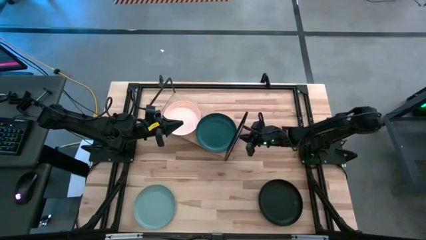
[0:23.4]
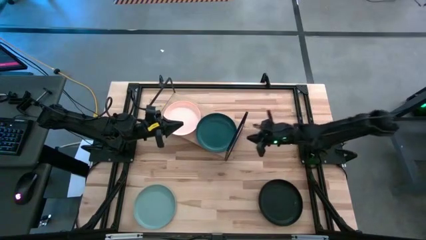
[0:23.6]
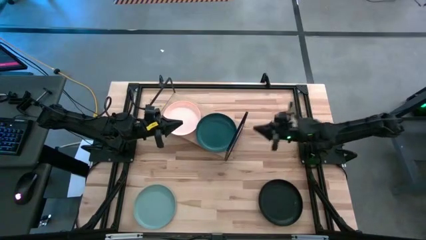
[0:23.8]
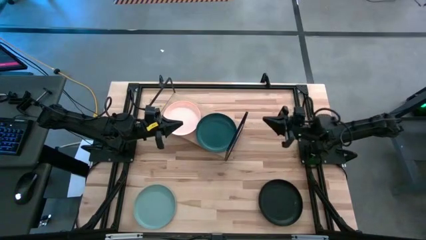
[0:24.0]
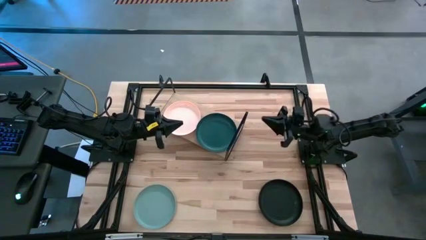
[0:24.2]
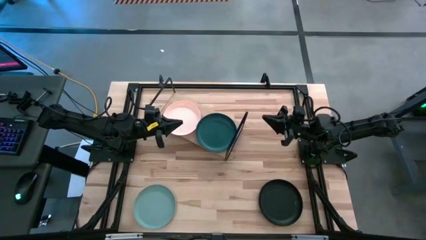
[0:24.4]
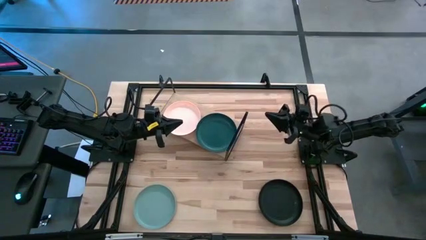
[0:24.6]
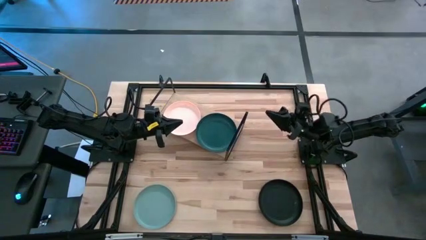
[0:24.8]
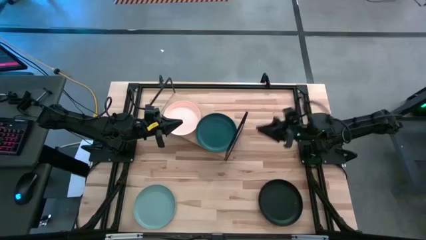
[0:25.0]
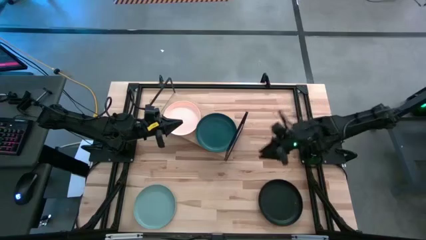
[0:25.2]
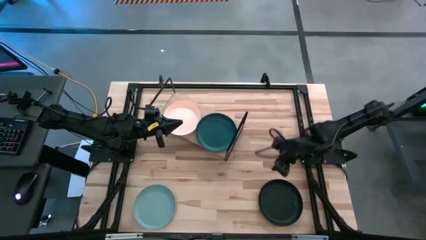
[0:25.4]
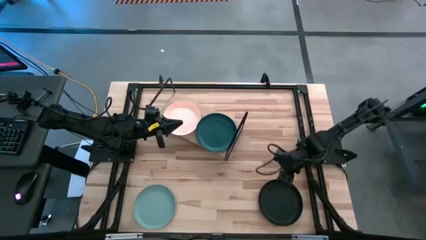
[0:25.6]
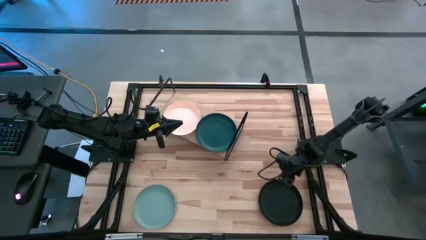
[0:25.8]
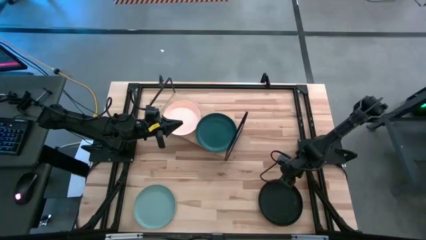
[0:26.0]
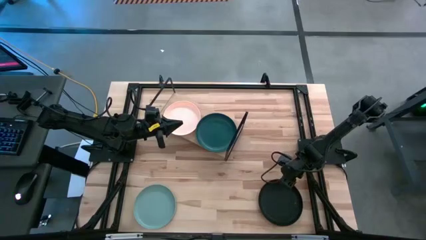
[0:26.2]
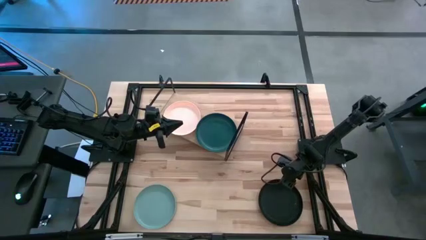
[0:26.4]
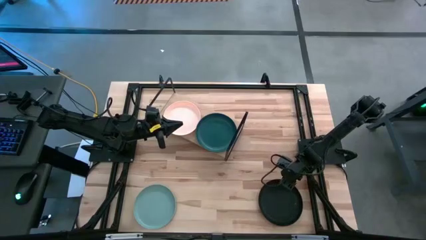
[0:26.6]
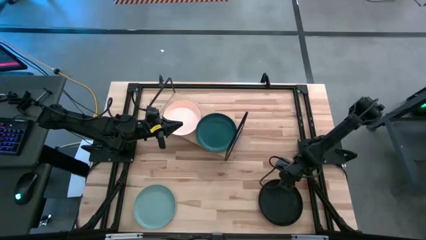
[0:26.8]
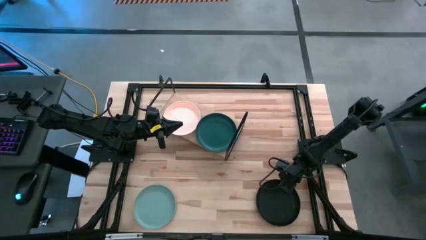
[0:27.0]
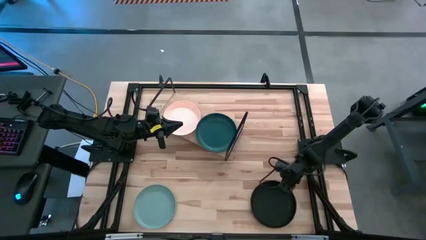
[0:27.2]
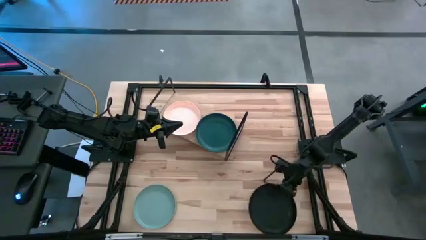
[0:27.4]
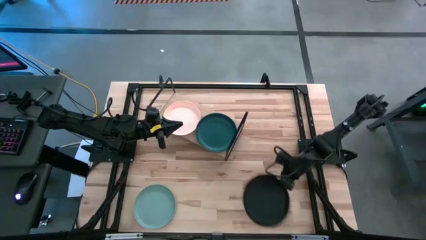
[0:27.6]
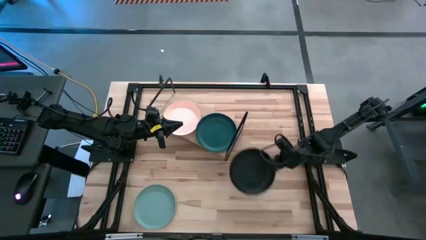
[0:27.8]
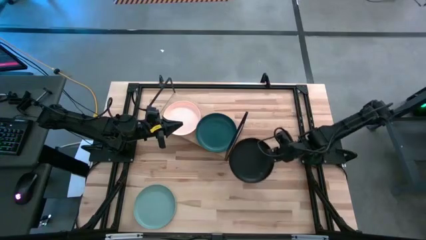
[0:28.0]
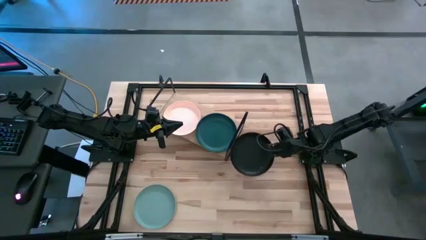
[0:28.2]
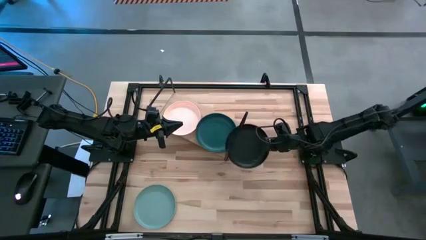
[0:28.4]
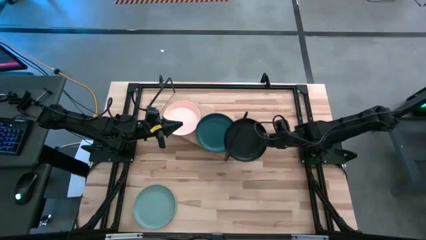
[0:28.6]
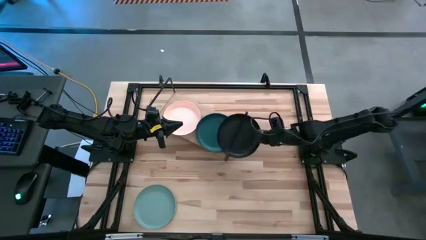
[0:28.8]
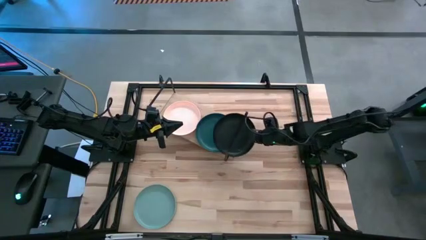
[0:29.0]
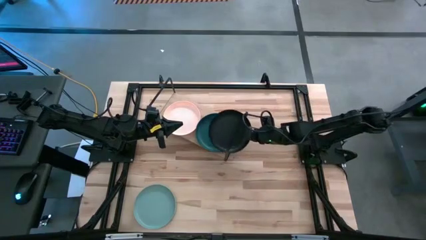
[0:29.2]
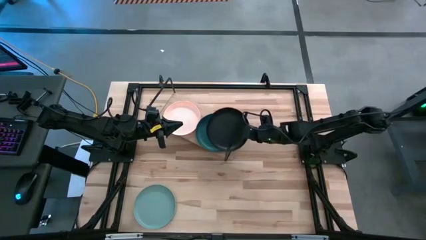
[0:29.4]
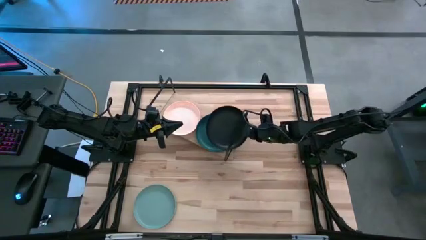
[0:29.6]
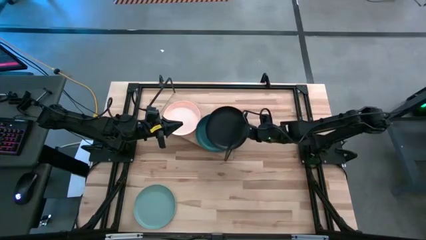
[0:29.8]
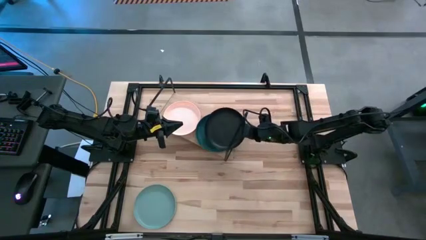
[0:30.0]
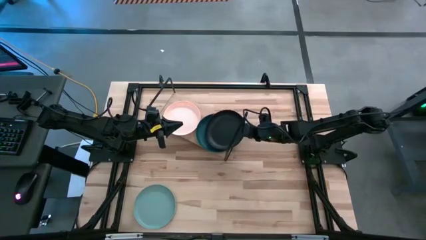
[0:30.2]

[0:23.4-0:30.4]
Task: Place and stack plates onto a shelf
Stack the black plate on top of the green plate on the shelf

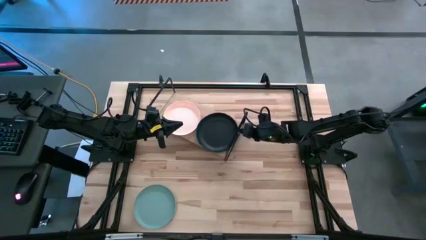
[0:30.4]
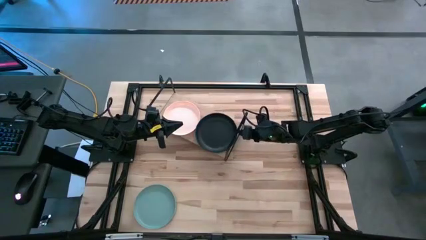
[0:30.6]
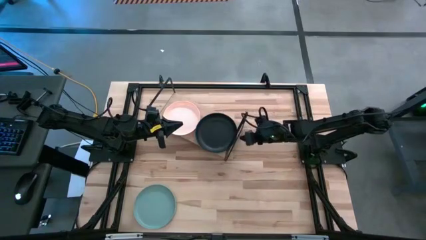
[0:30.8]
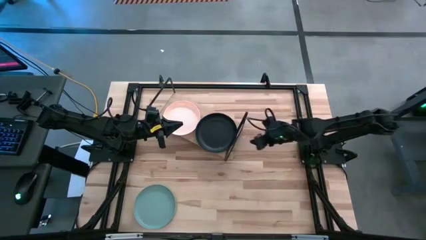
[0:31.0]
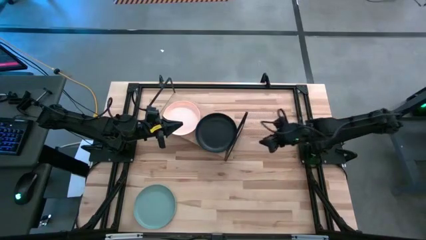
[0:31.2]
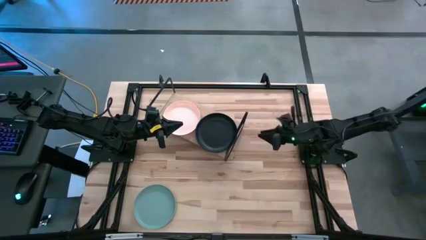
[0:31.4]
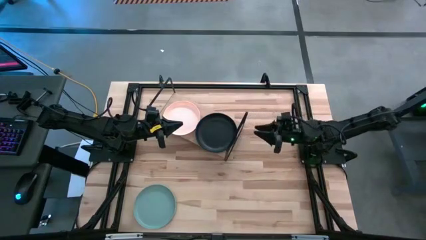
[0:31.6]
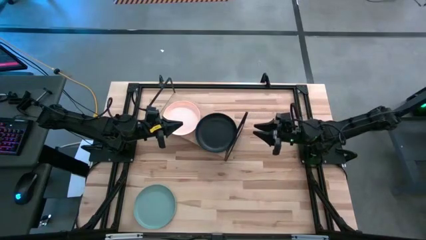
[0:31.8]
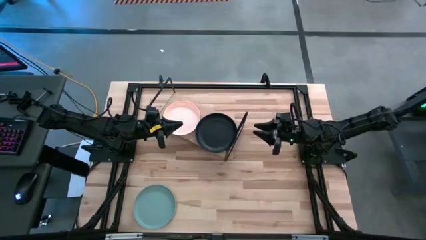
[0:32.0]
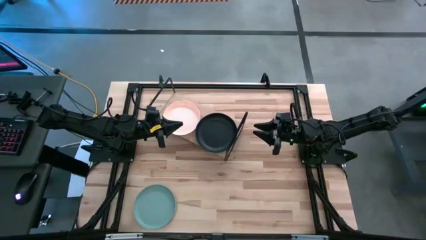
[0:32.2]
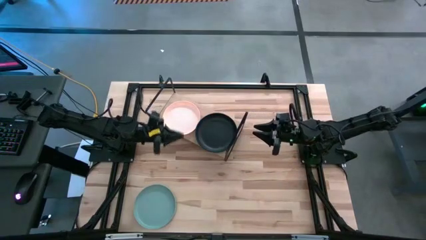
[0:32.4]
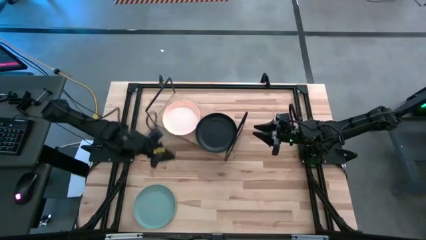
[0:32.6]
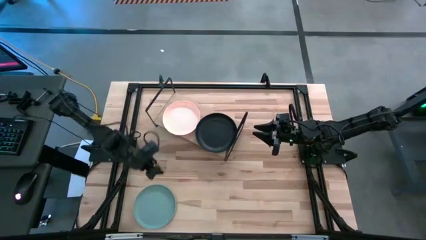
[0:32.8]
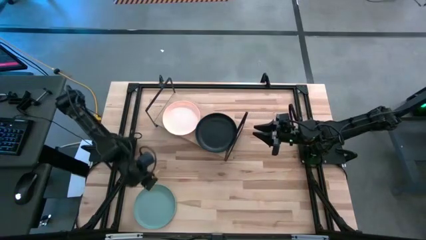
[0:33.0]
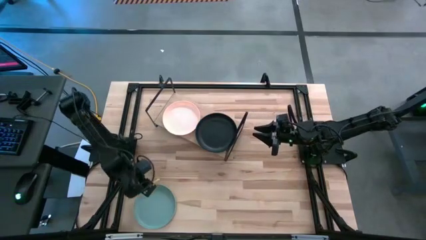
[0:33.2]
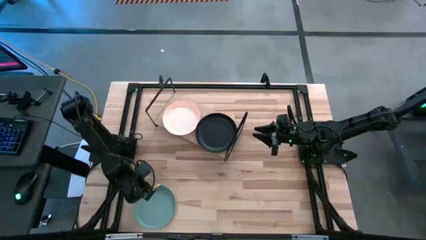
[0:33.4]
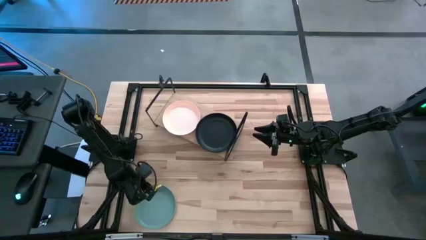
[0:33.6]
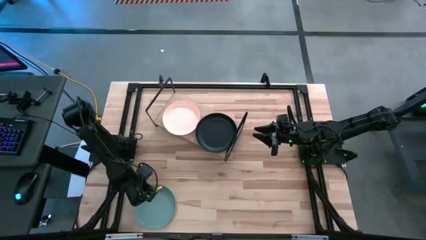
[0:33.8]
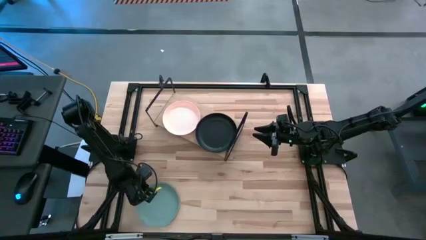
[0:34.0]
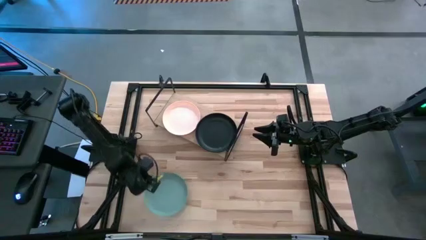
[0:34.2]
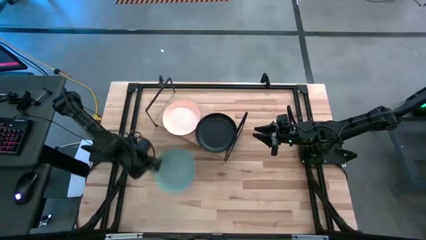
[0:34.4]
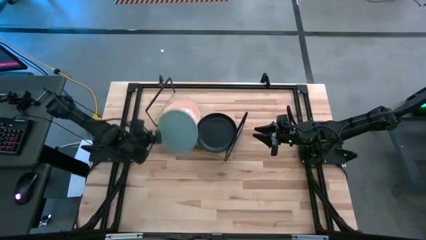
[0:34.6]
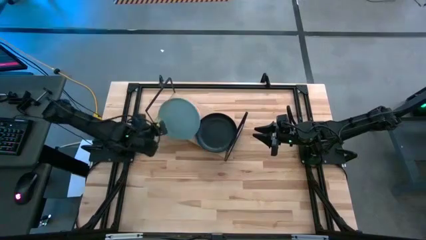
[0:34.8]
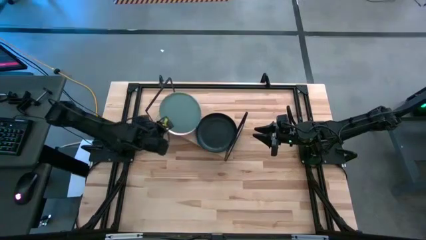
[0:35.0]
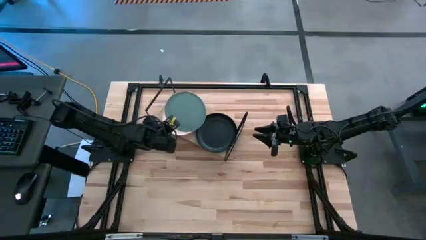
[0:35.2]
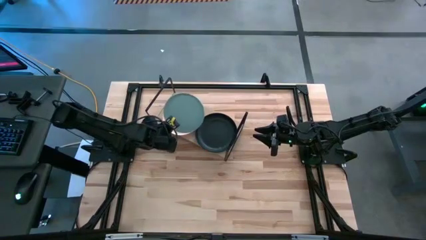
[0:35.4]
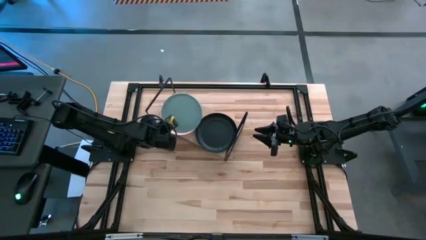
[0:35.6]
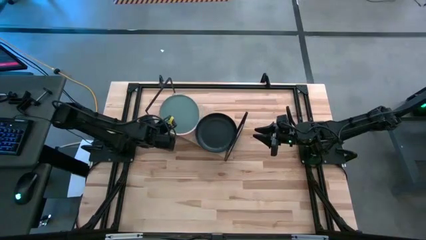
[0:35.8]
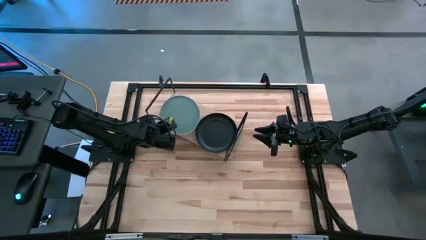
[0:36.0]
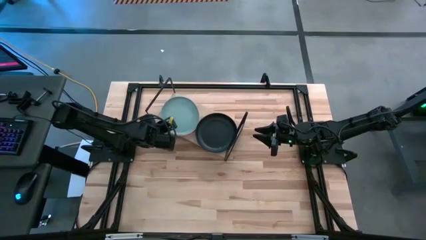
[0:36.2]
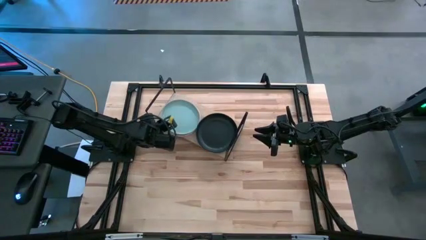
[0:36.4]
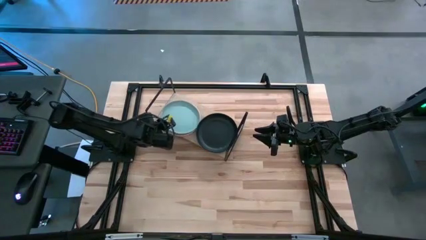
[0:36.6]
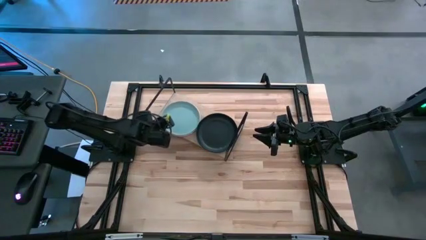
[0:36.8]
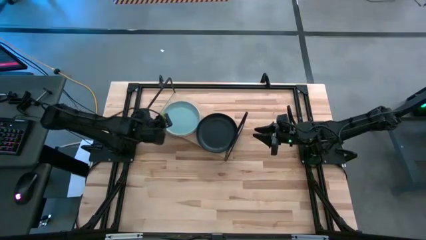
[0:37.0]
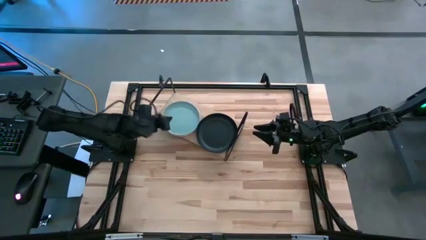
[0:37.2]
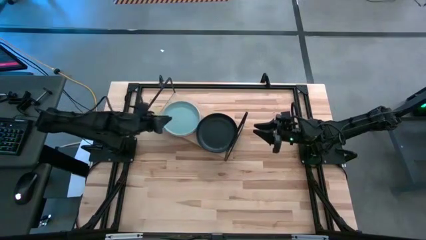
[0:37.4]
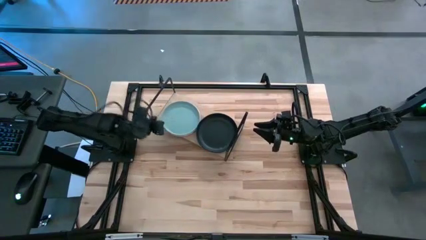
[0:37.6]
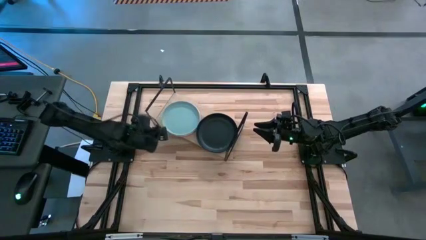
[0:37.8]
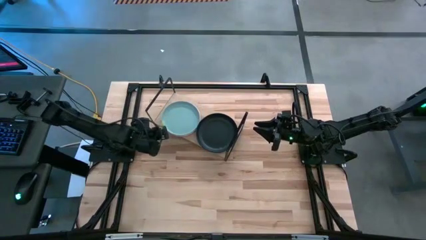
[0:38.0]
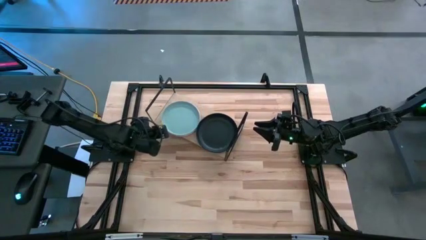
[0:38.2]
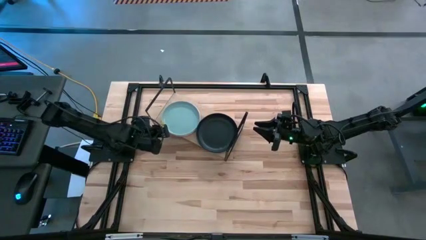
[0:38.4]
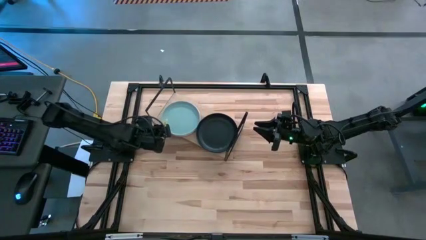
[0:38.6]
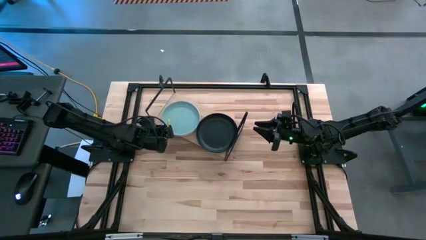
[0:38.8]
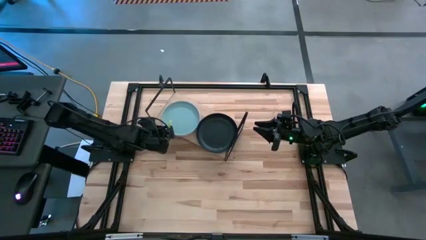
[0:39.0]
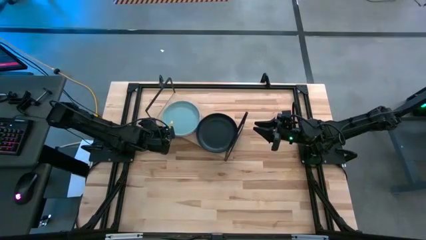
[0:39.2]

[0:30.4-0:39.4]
Stack the blue plate on top of the pink plate on the shelf
